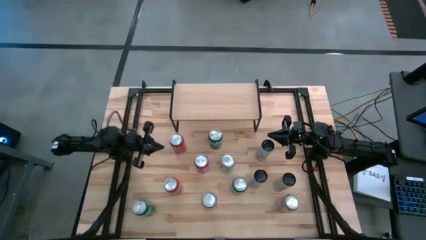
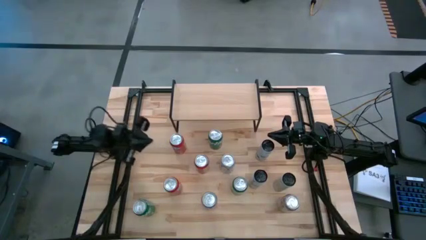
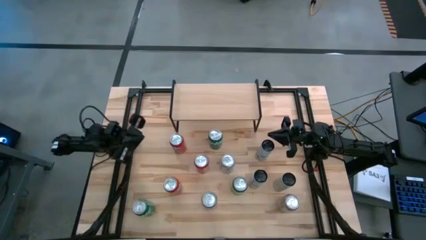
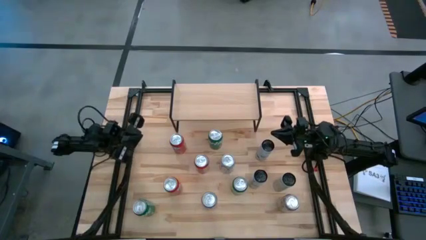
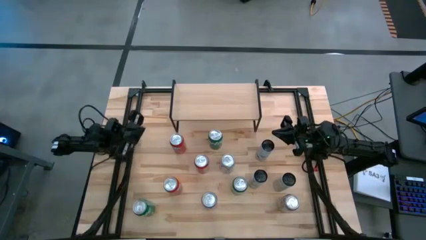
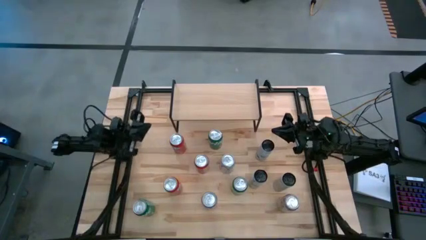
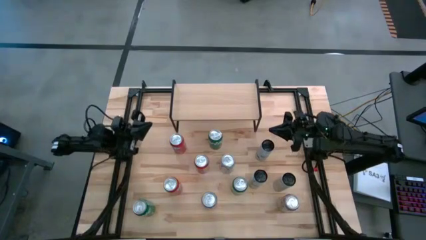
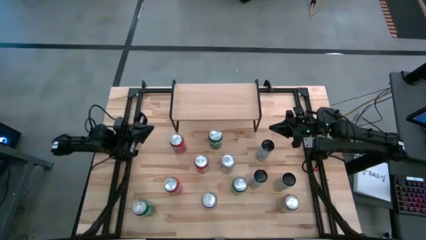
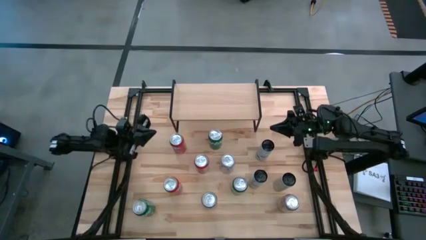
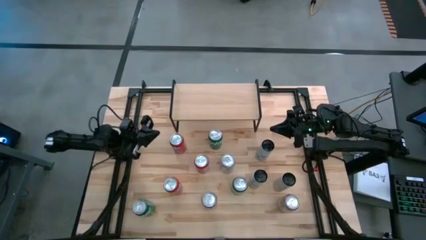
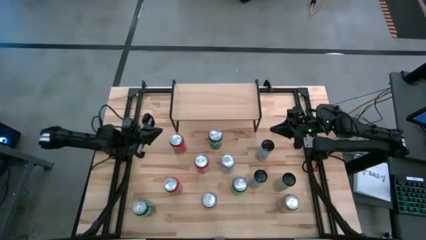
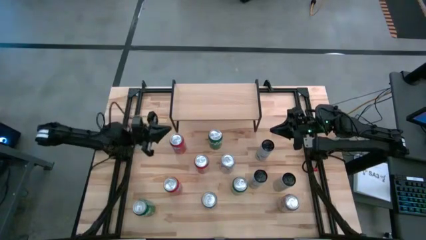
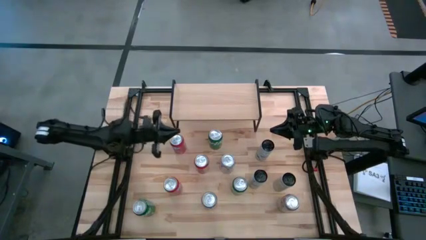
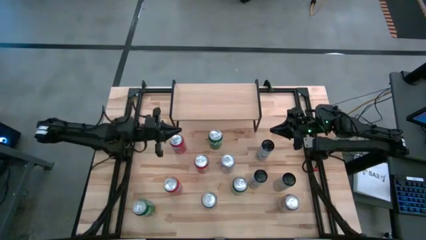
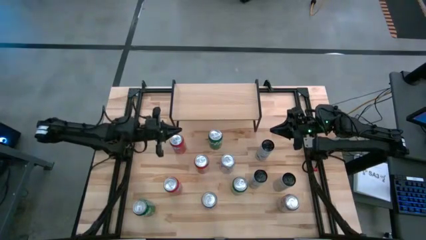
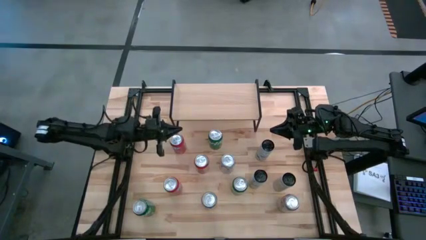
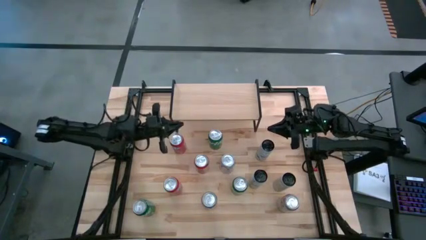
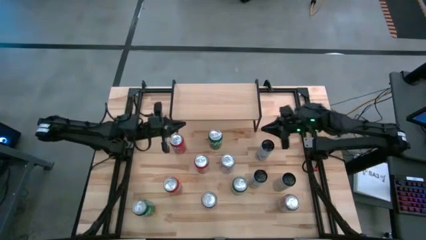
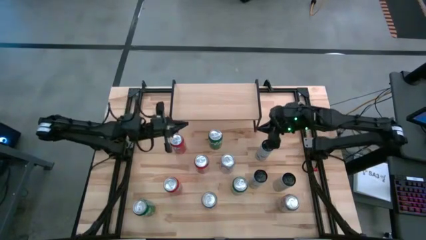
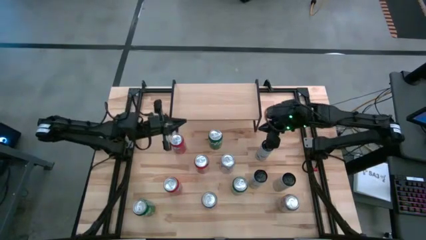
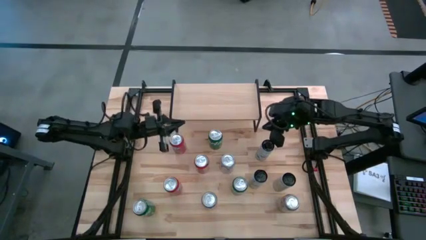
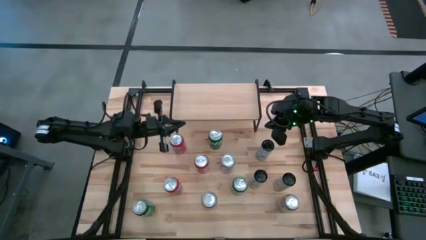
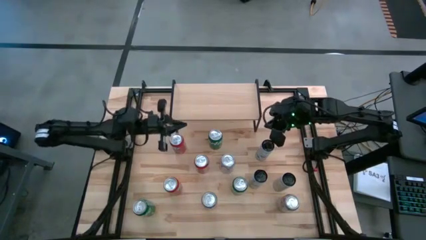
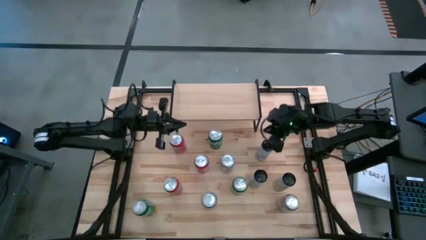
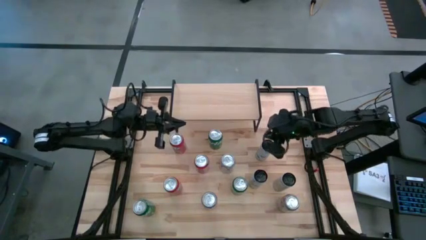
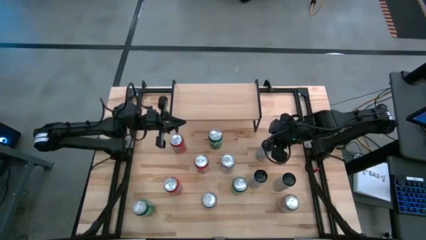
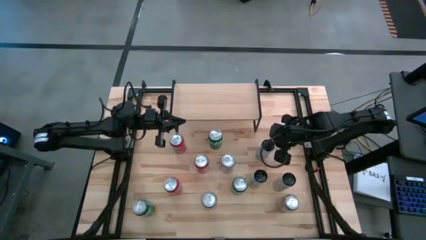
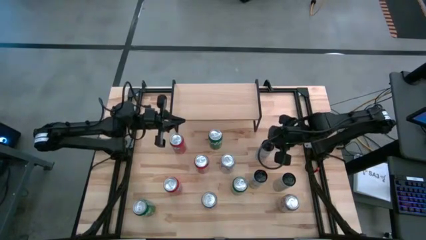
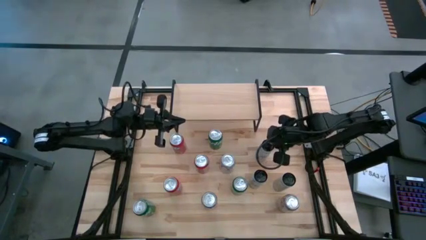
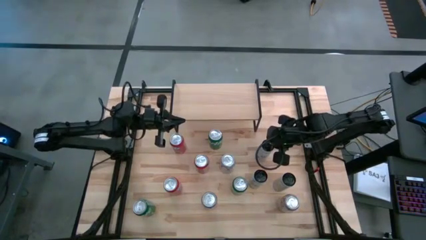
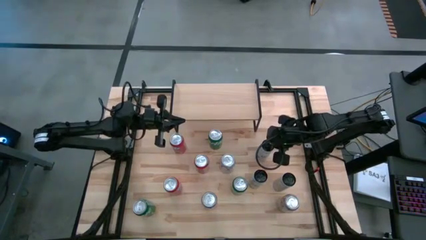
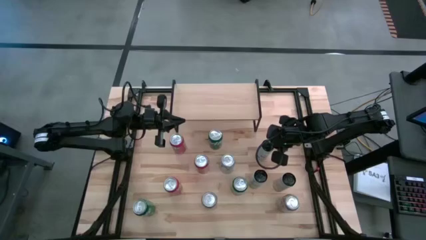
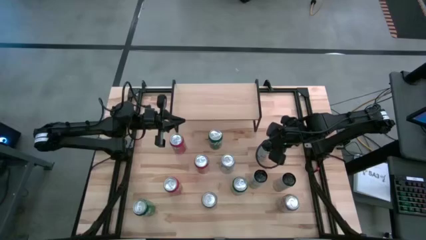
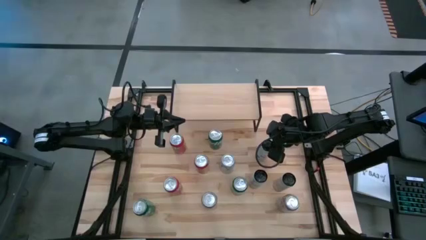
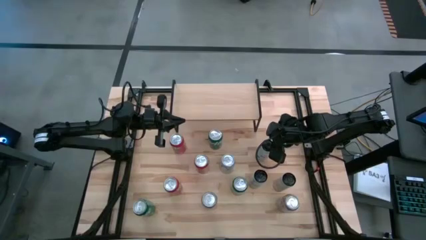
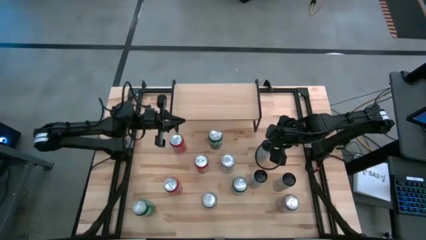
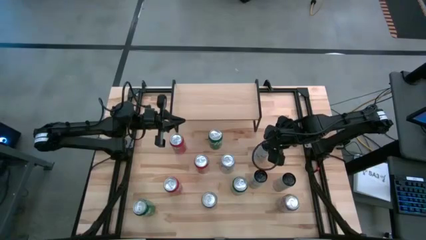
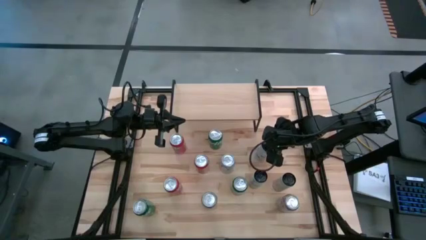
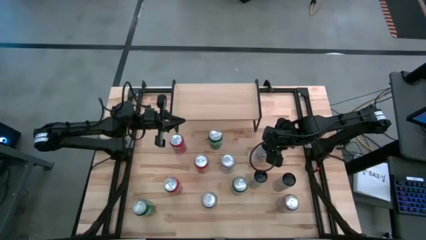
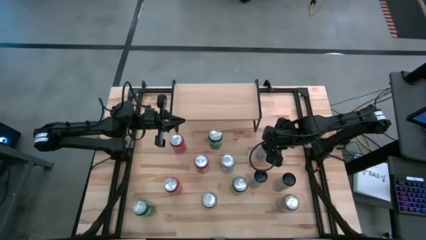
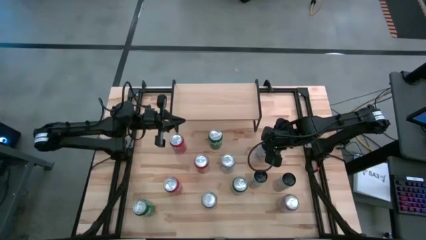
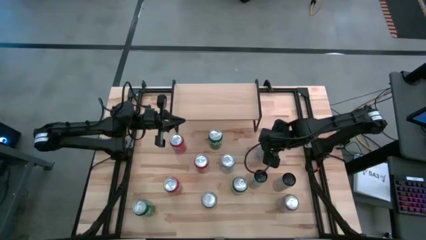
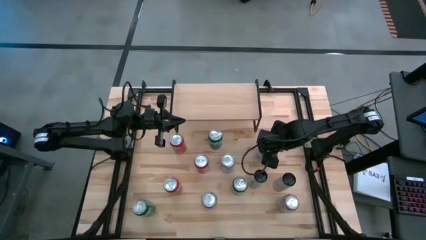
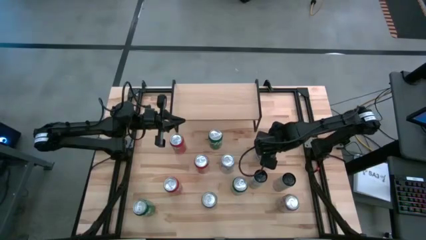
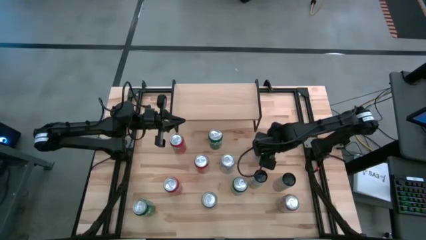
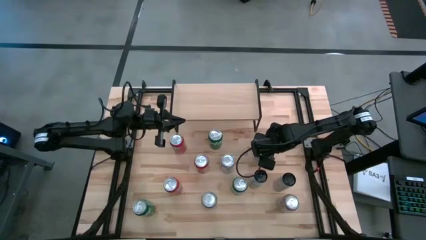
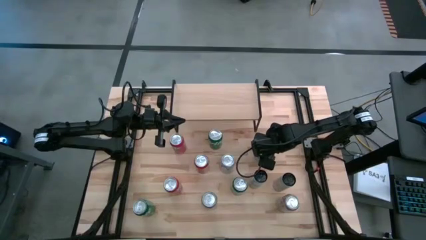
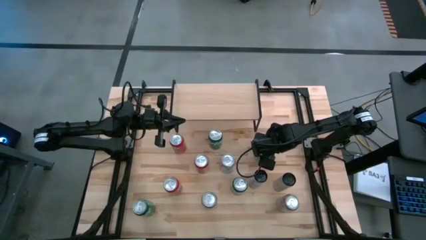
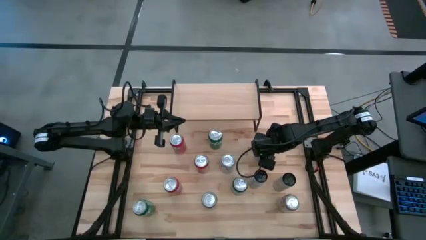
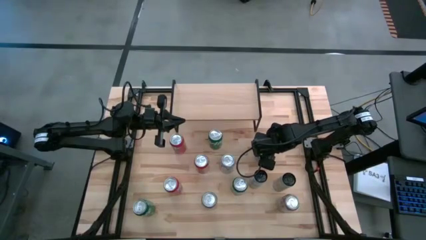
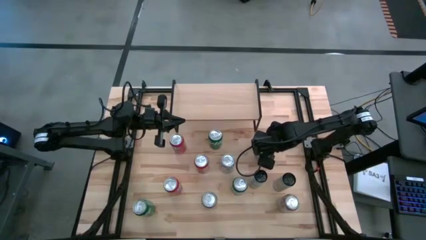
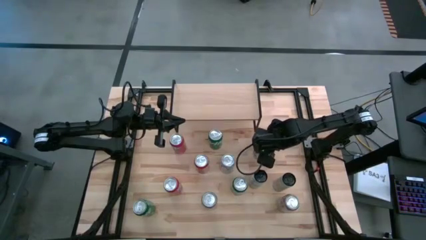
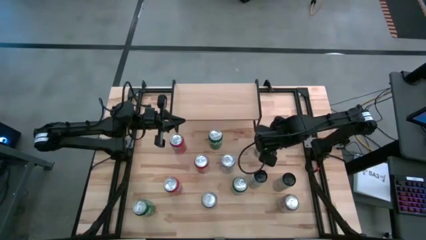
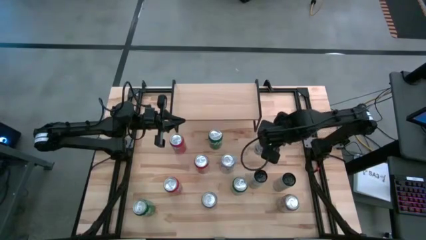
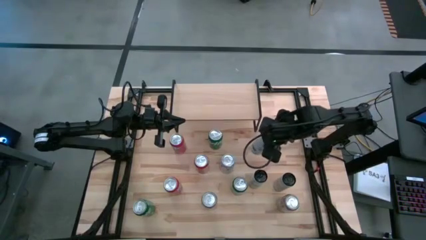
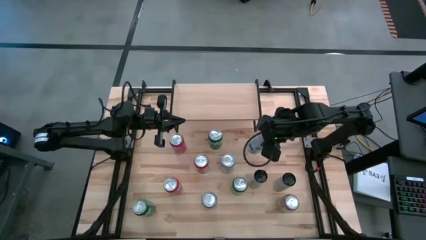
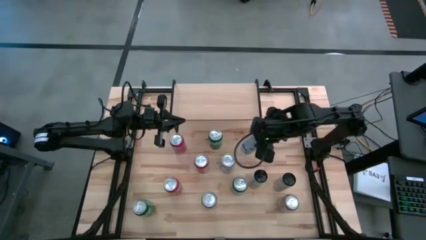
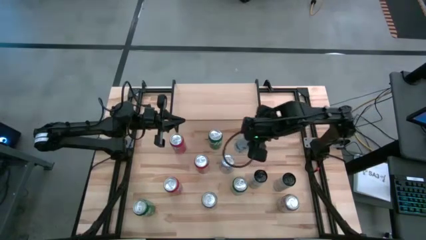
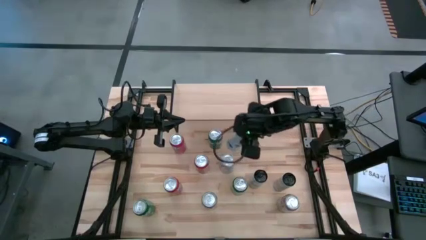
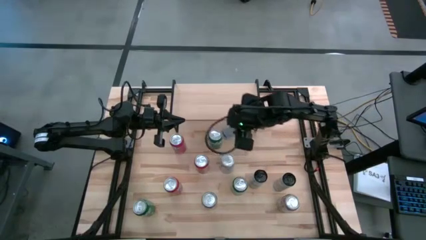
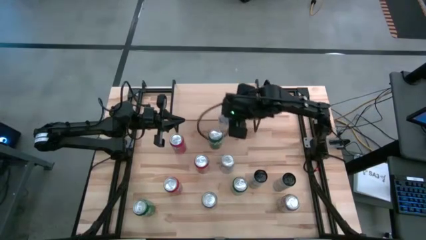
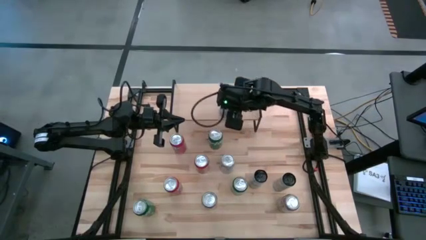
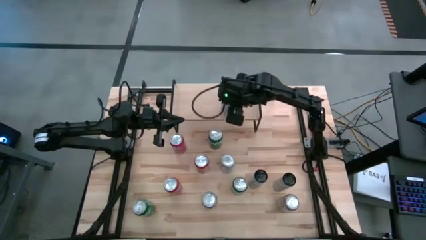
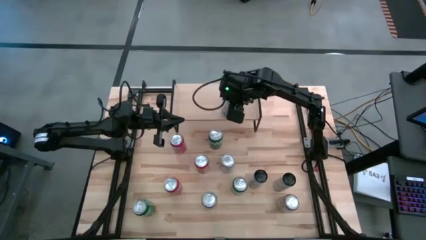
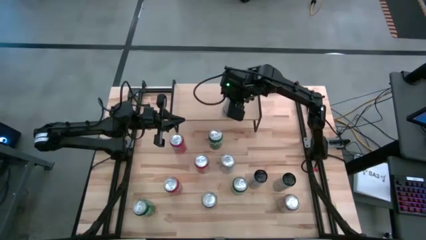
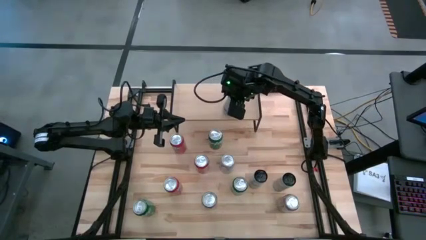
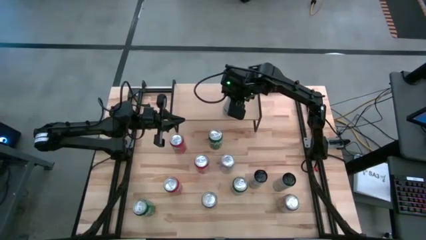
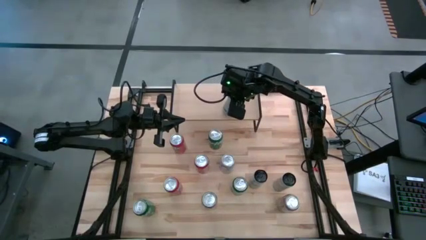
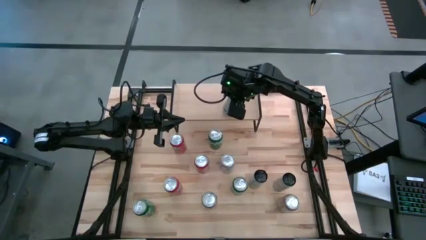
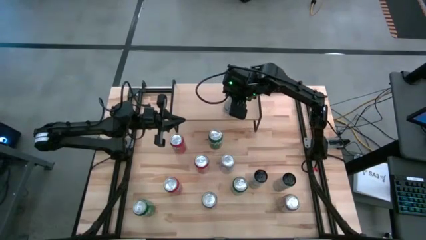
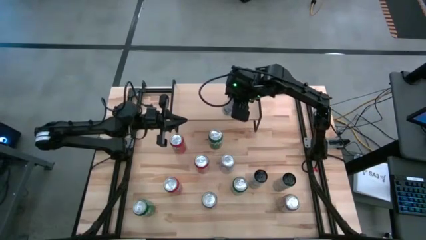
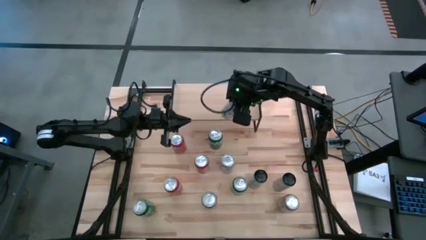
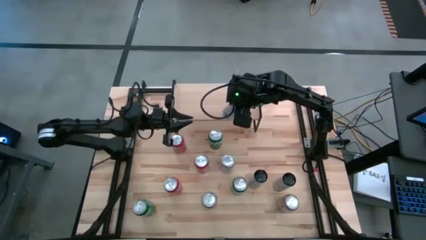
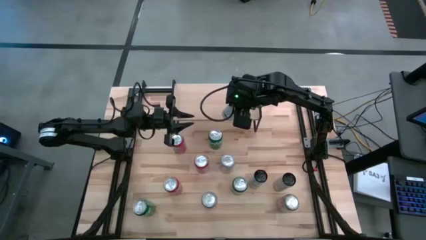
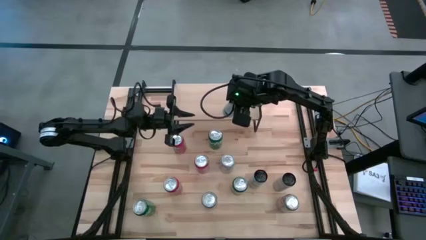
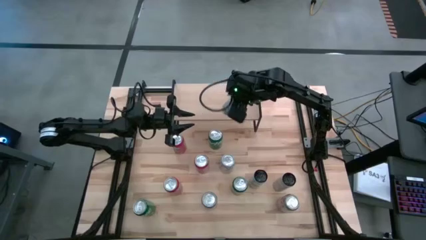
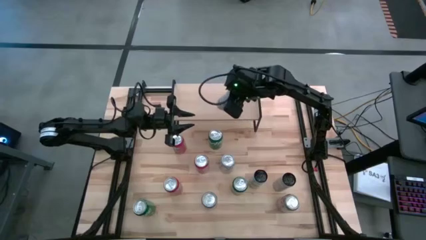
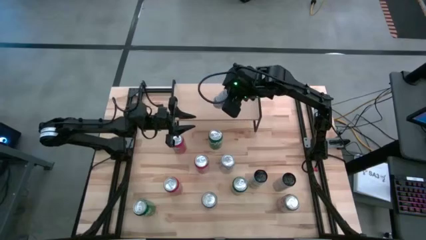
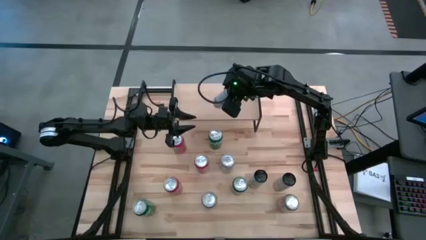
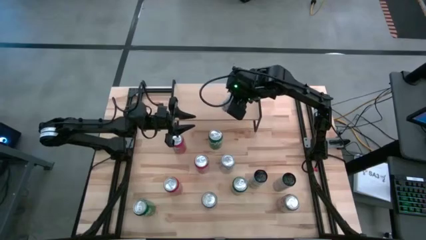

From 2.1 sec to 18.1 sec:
Task: Place canned beverage on shelf
Put the top white-blue soda can on the shelf
